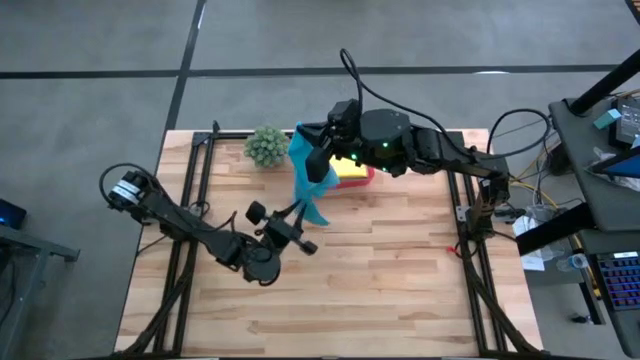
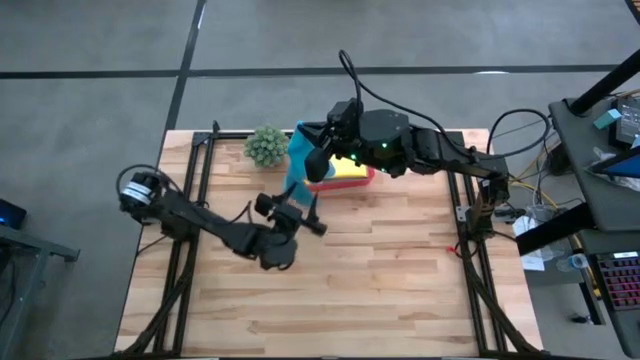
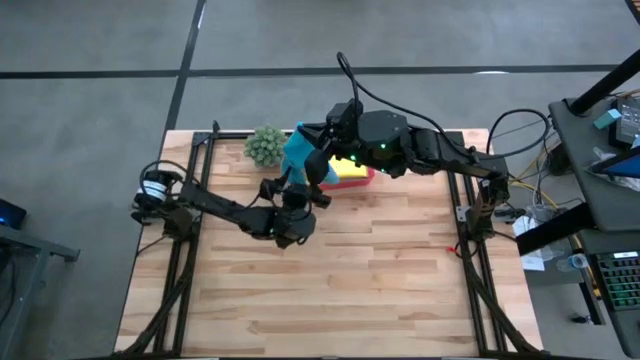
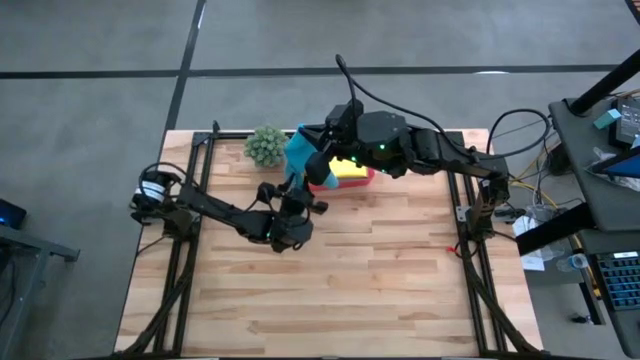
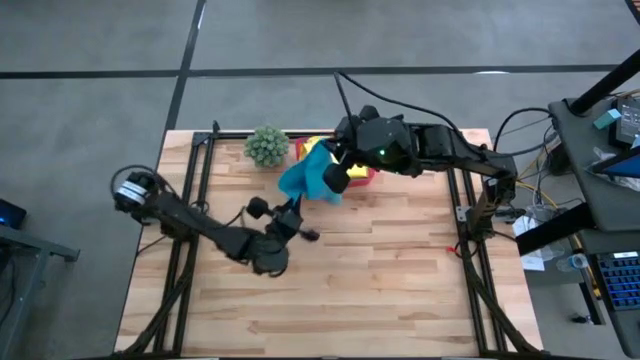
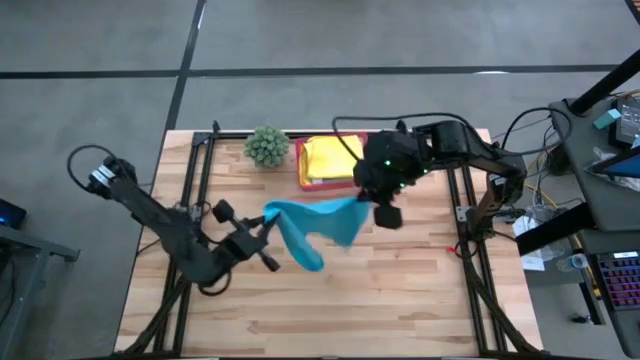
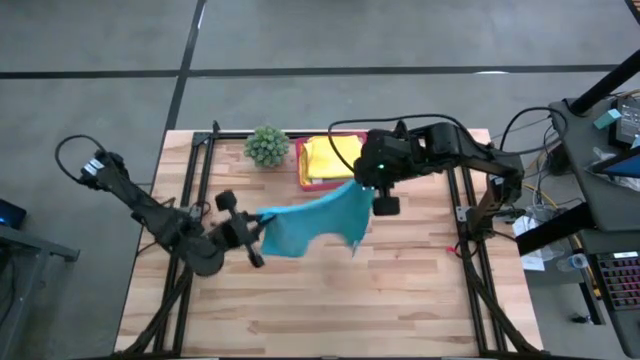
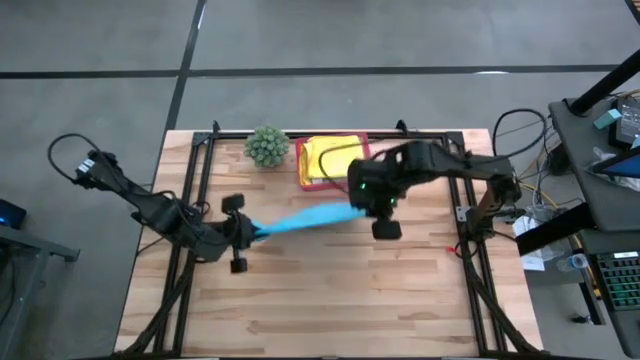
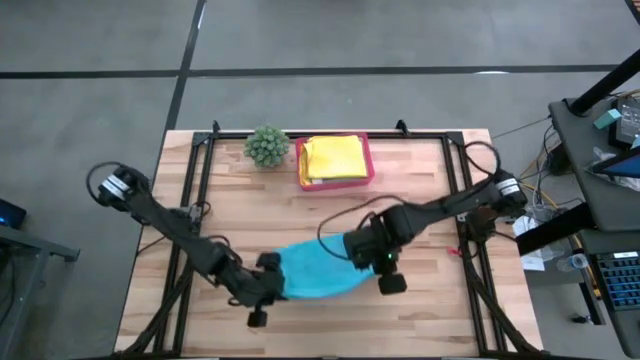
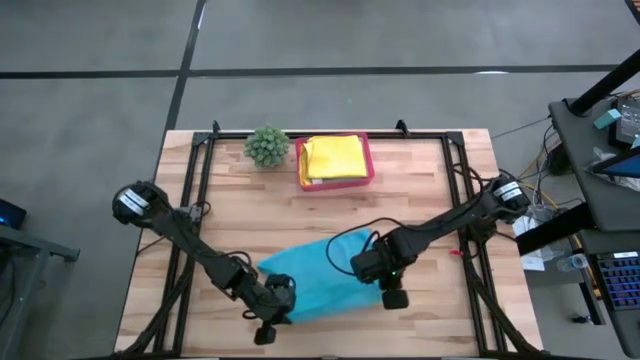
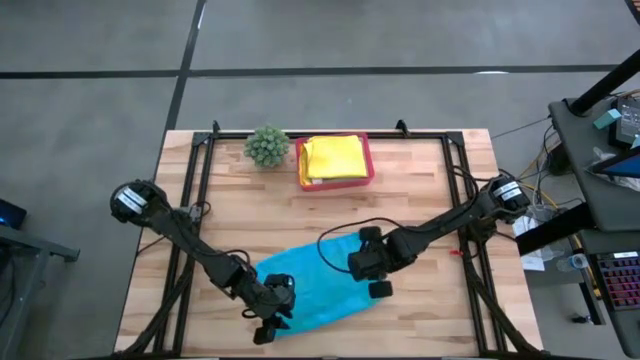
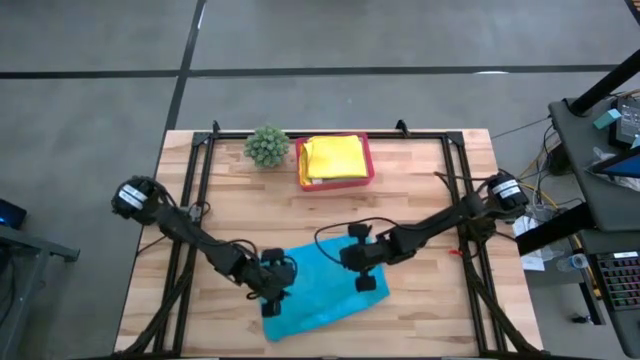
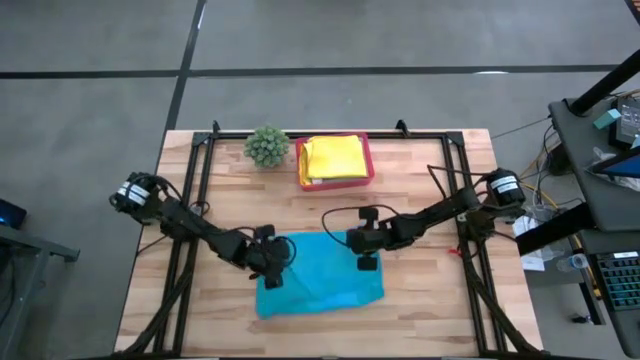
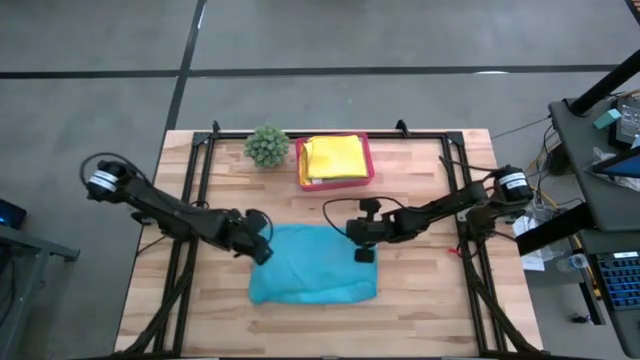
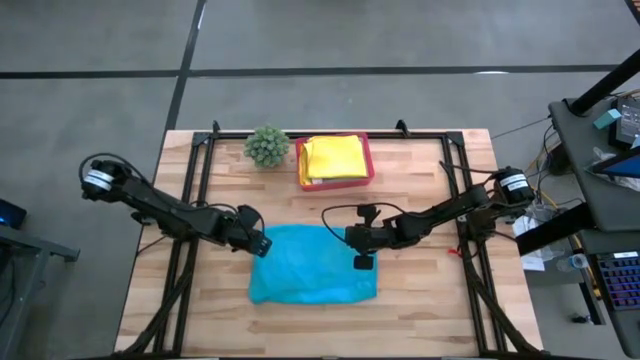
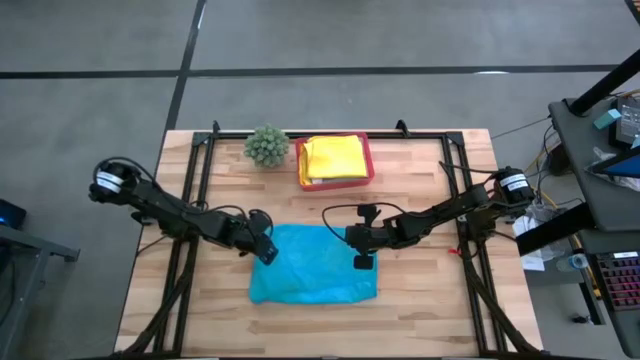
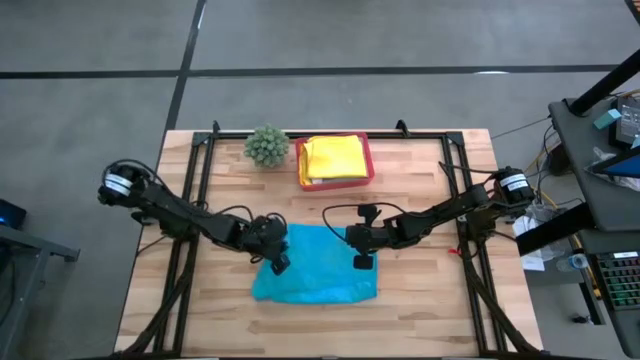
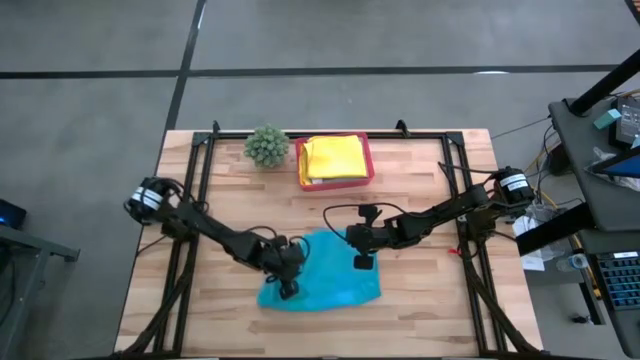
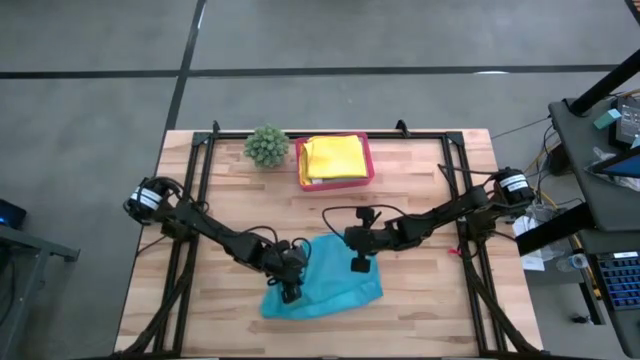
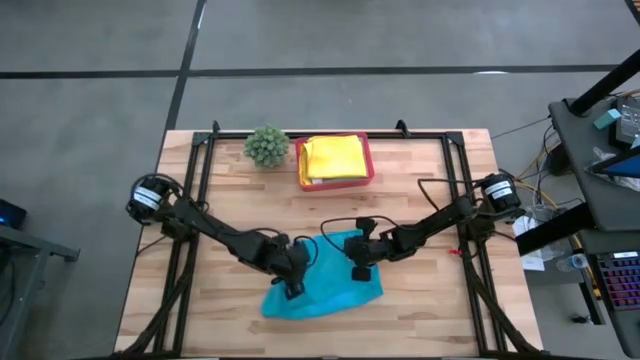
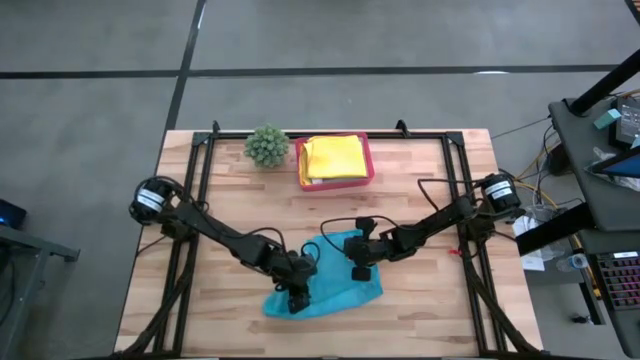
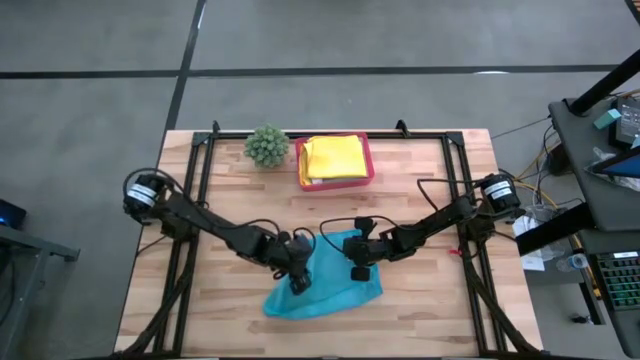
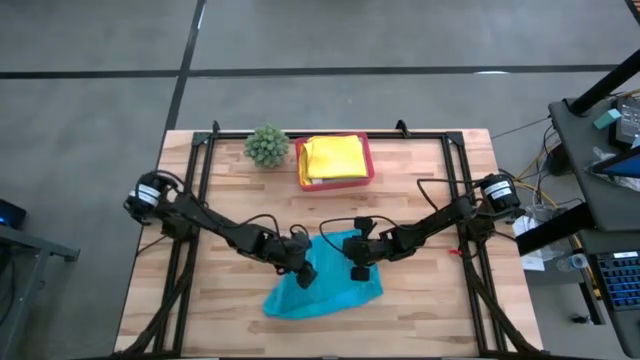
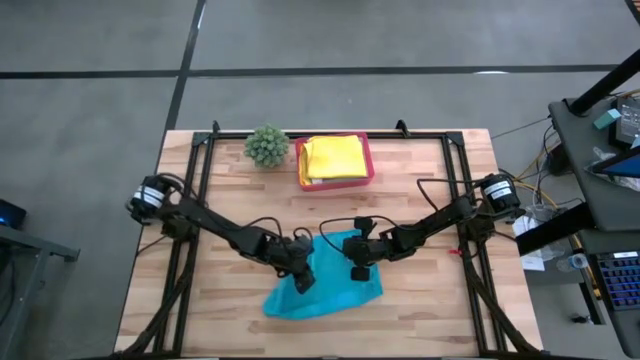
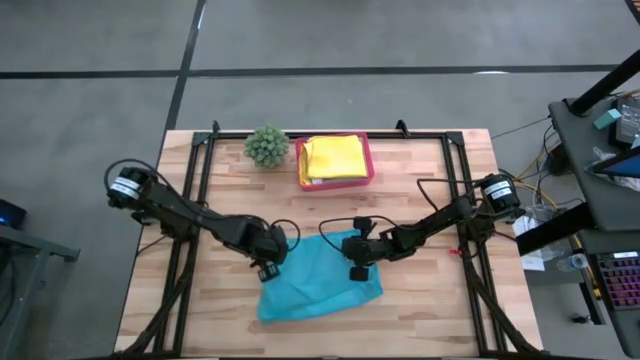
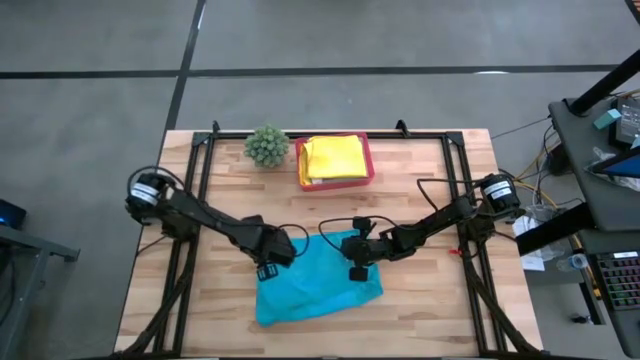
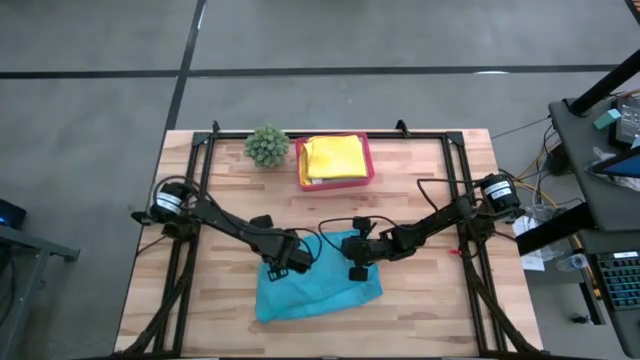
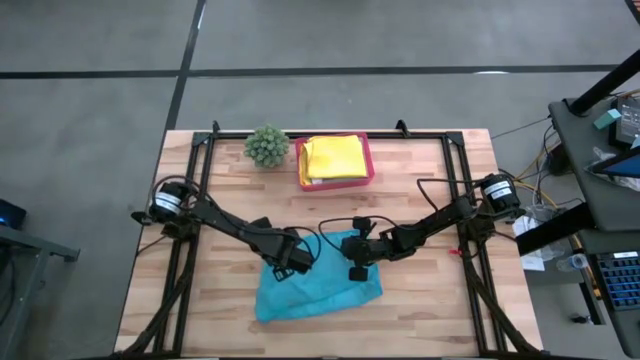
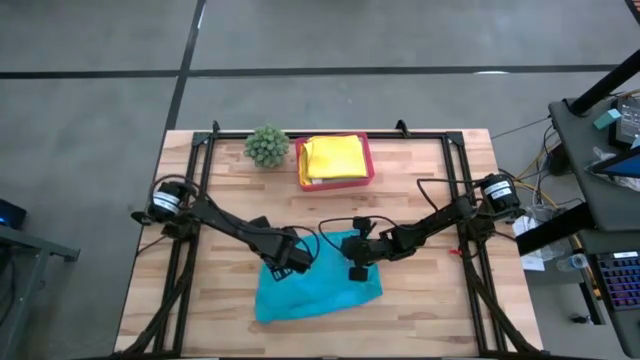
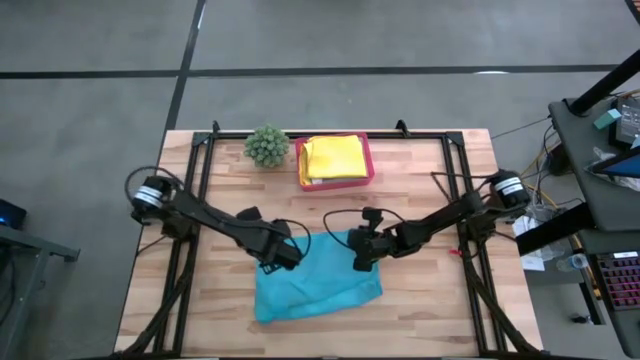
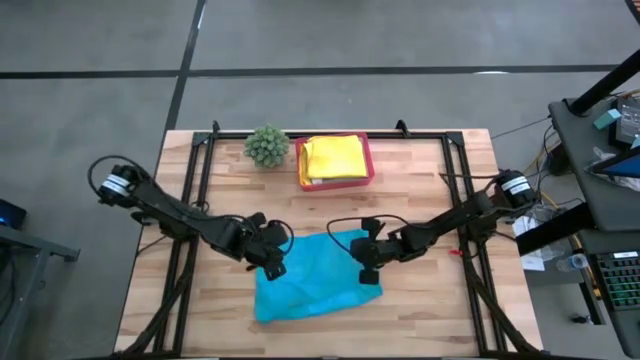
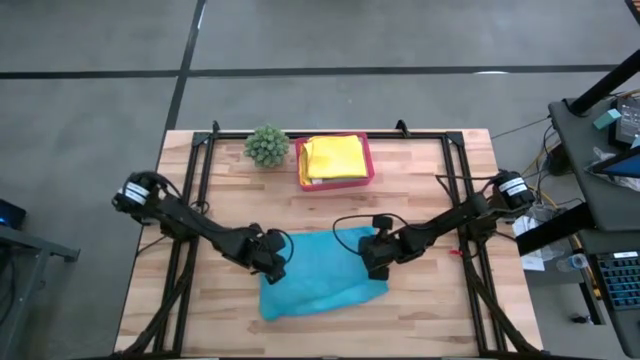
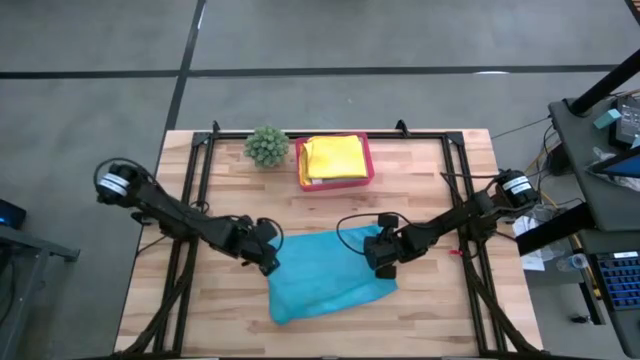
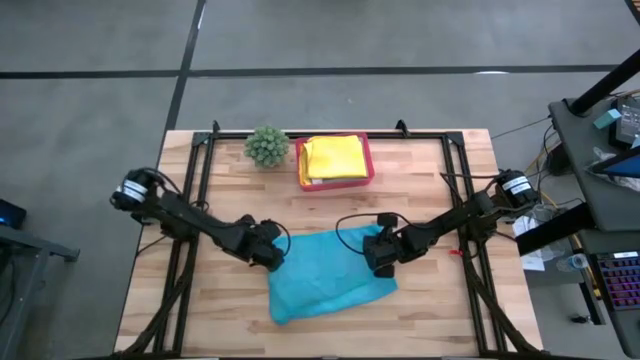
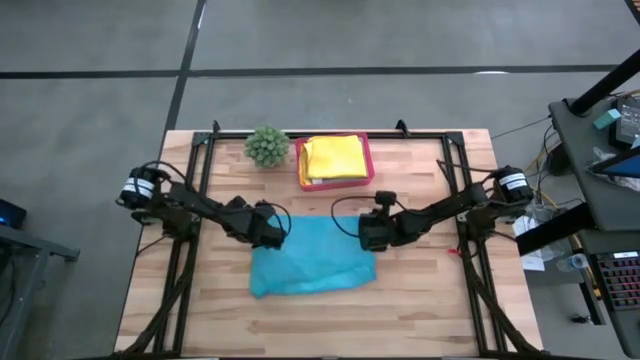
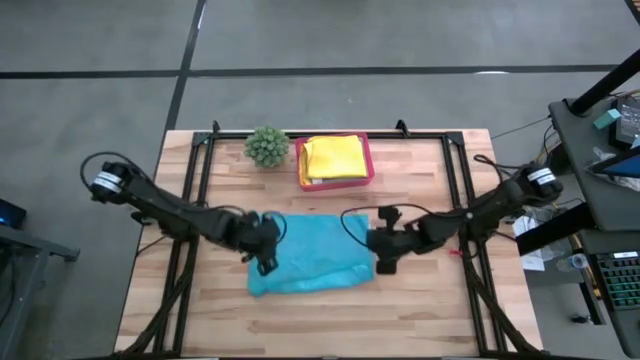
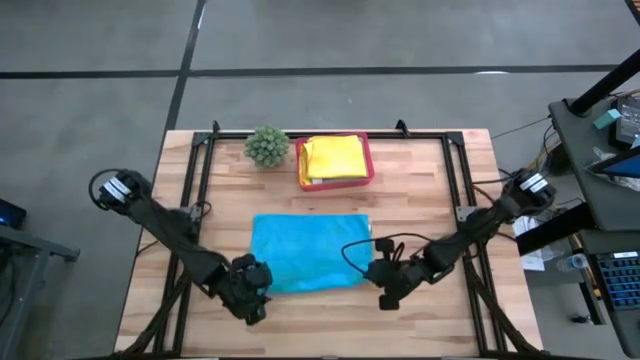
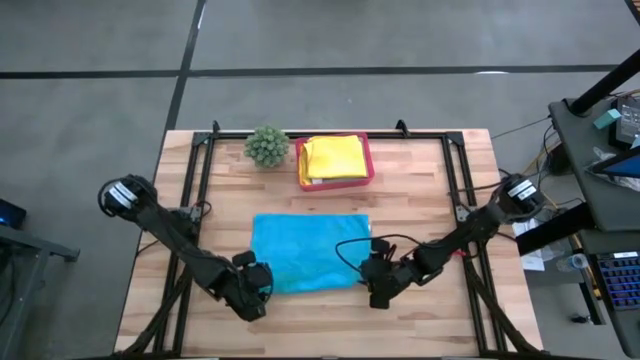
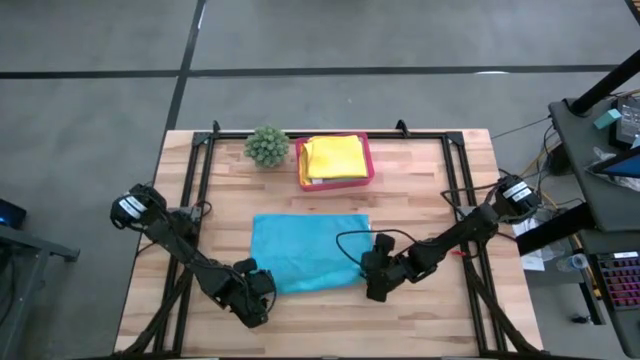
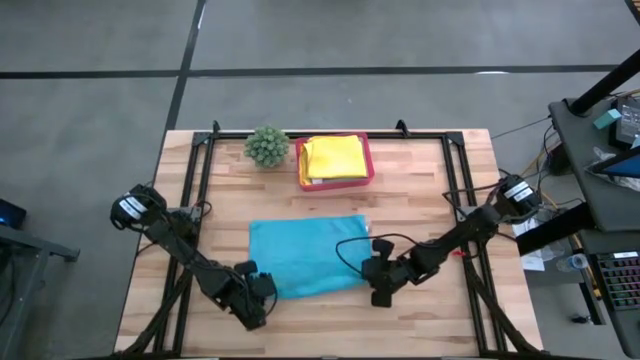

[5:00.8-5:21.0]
Task: Fold microfiber towels
Fold the blue microfiber towel

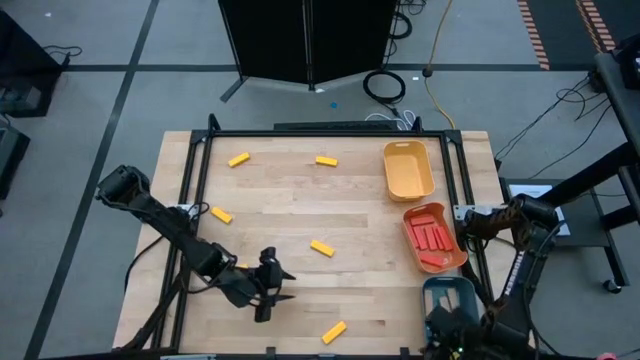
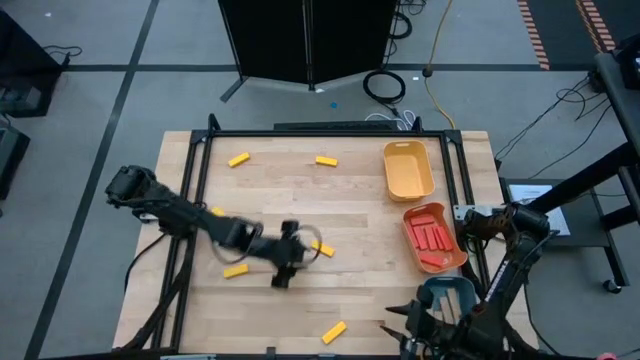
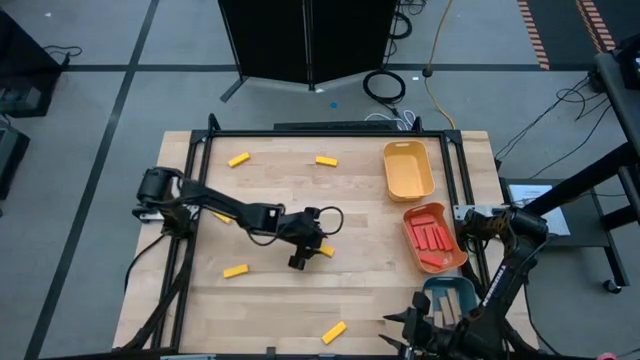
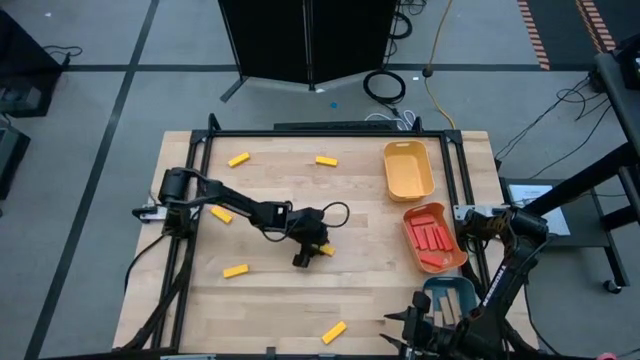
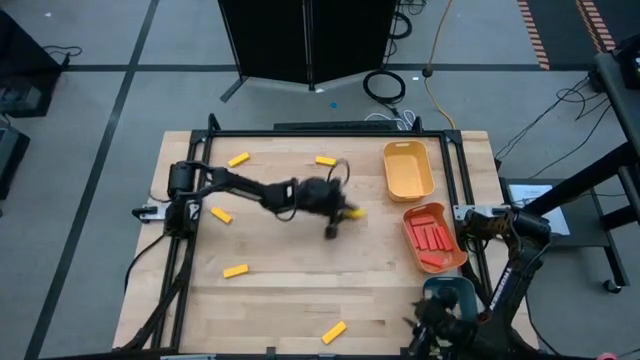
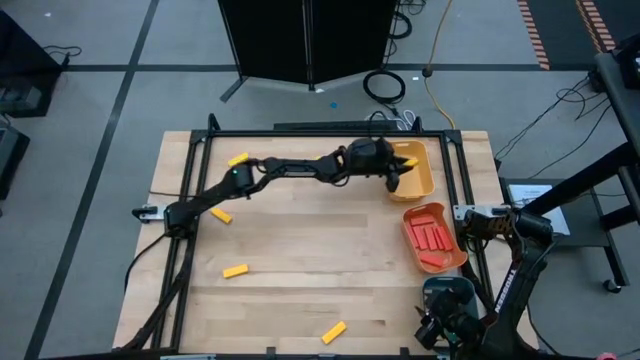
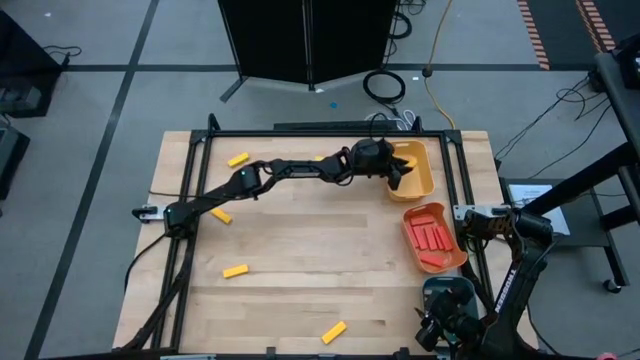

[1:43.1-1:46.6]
Task: Sort blocks
Put the yellow block into the yellow bin
